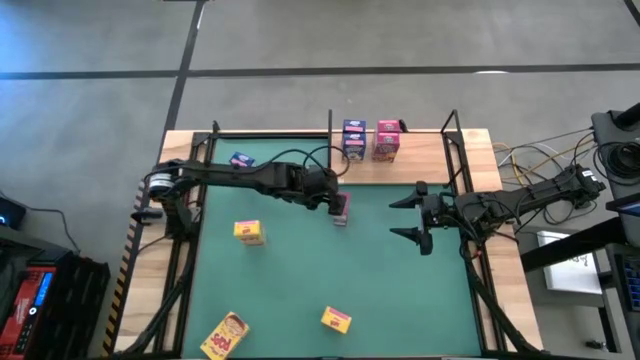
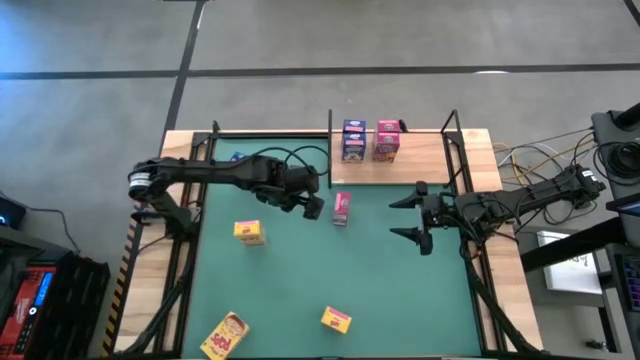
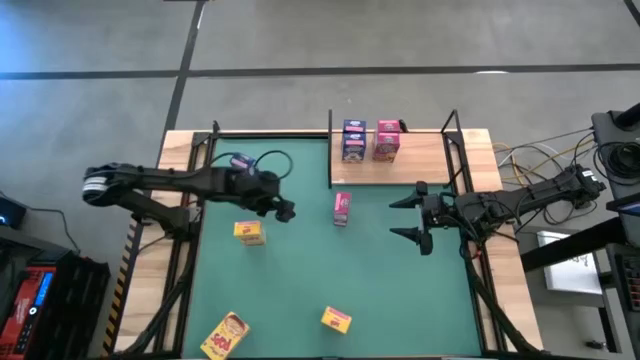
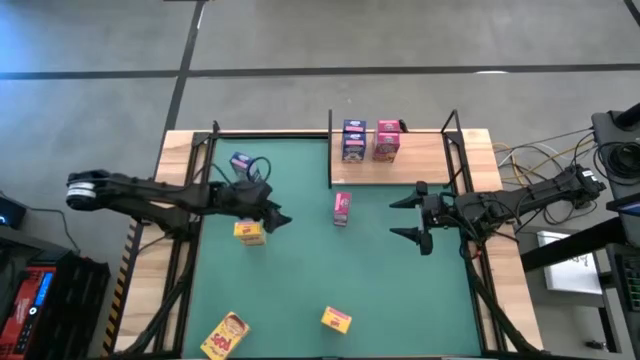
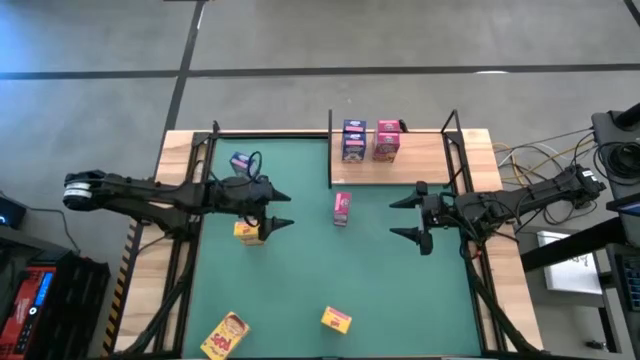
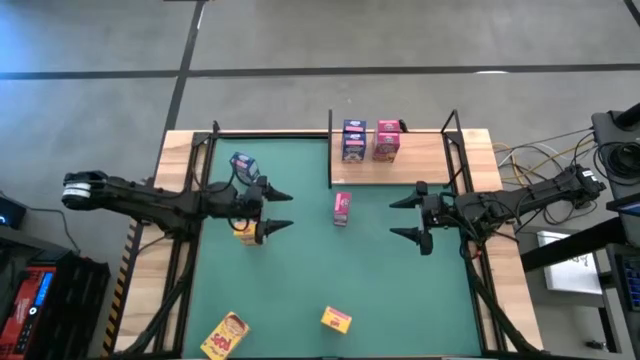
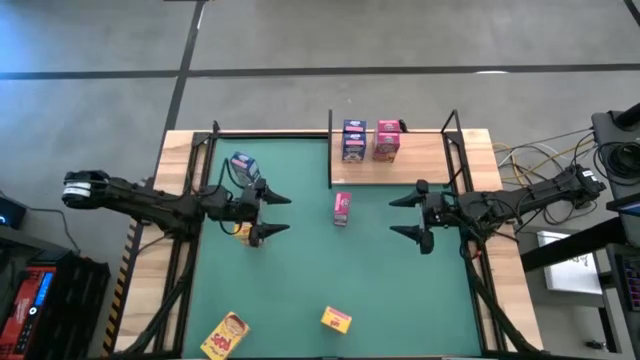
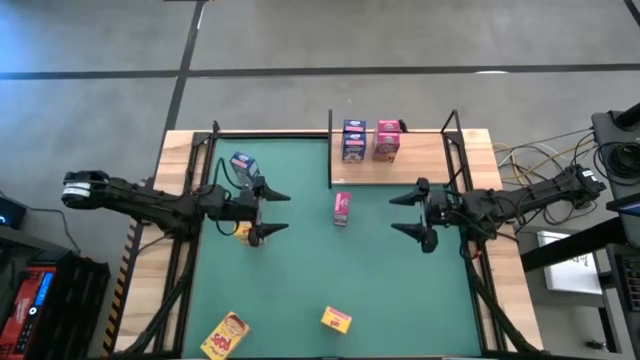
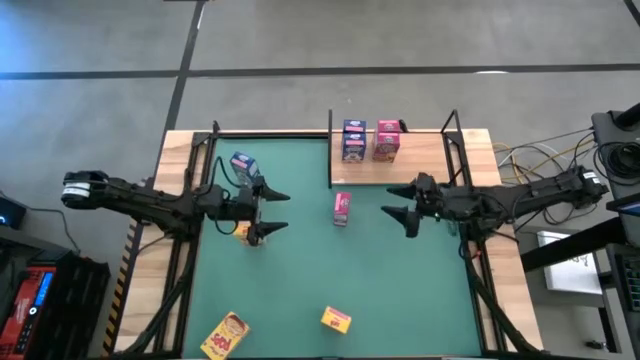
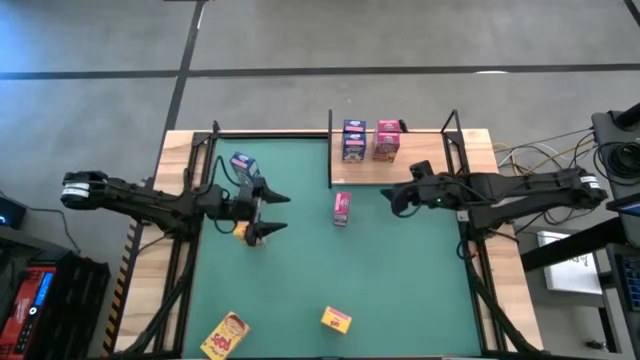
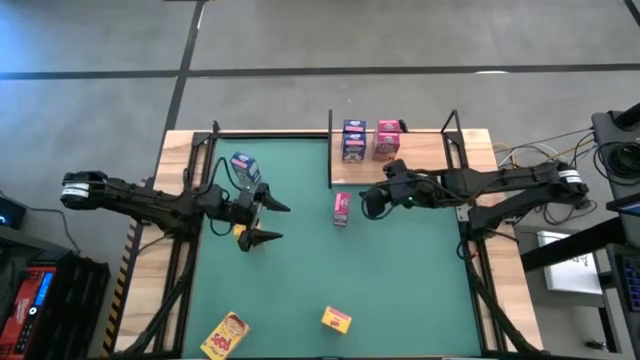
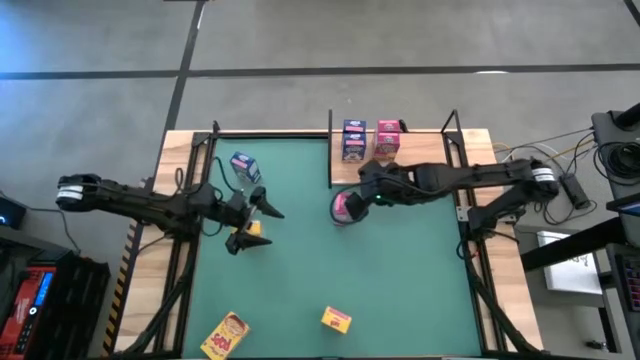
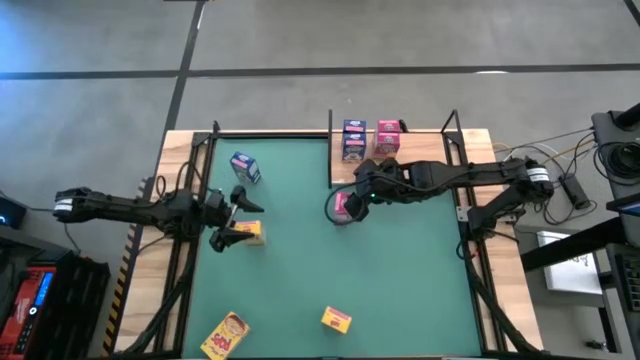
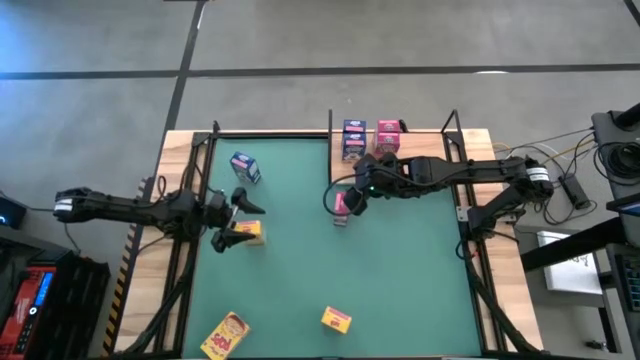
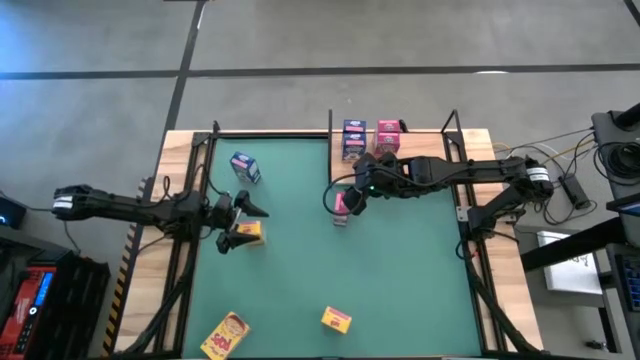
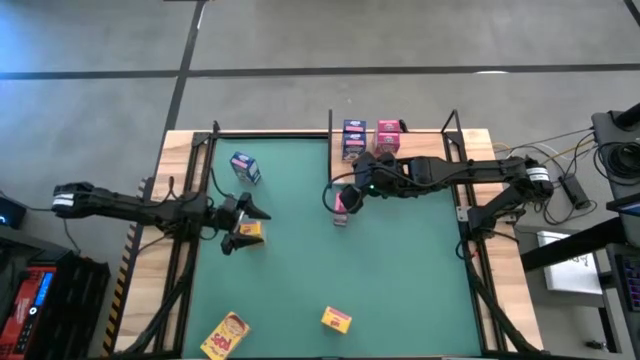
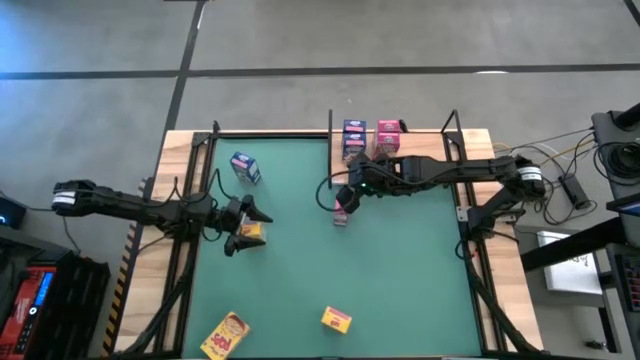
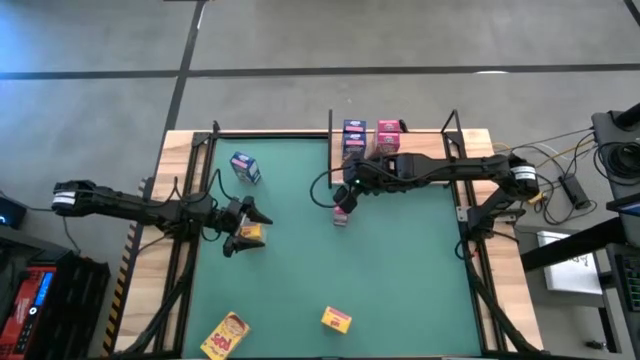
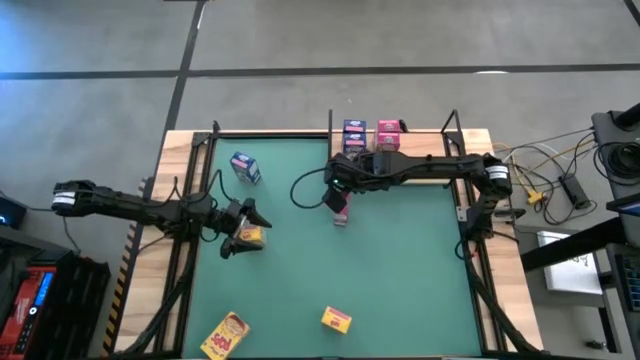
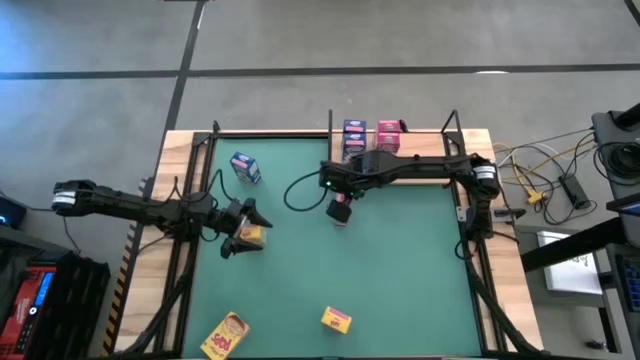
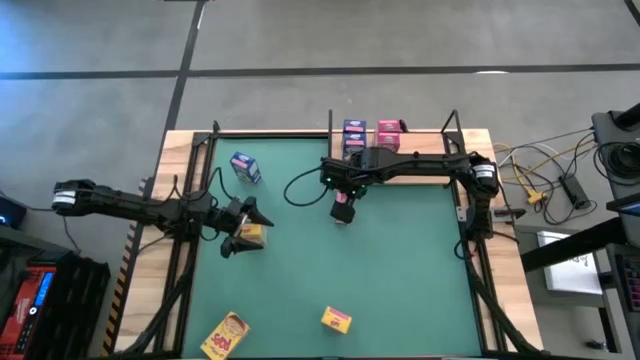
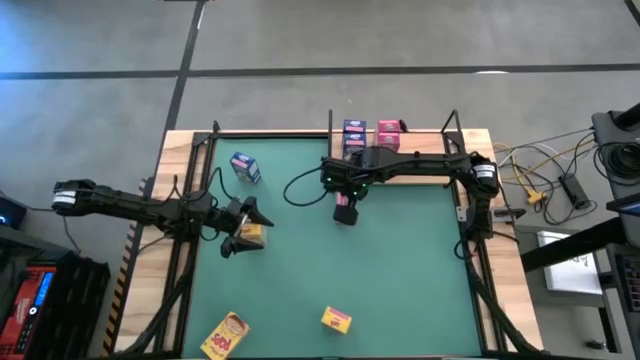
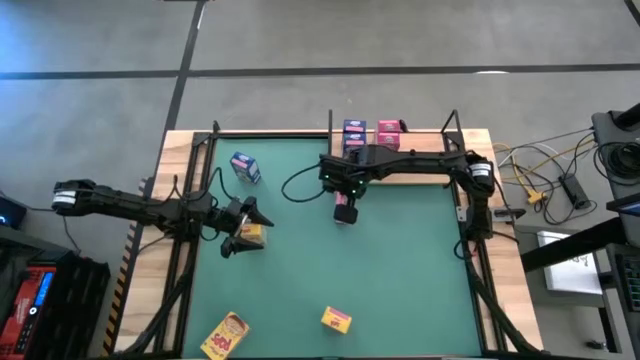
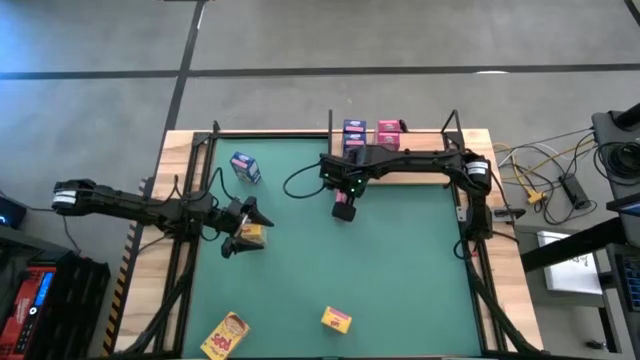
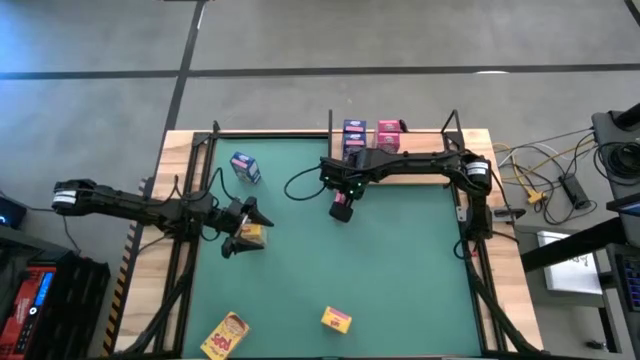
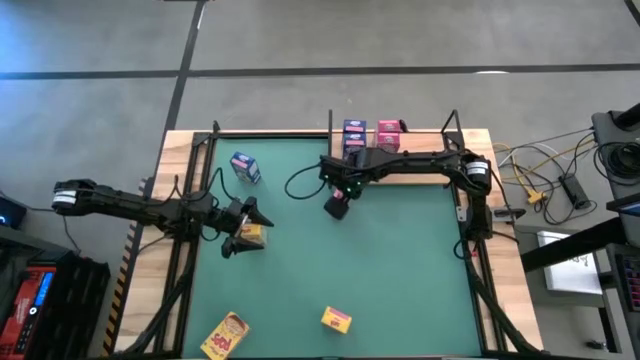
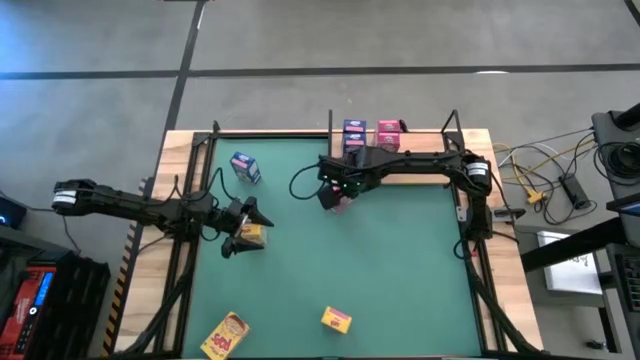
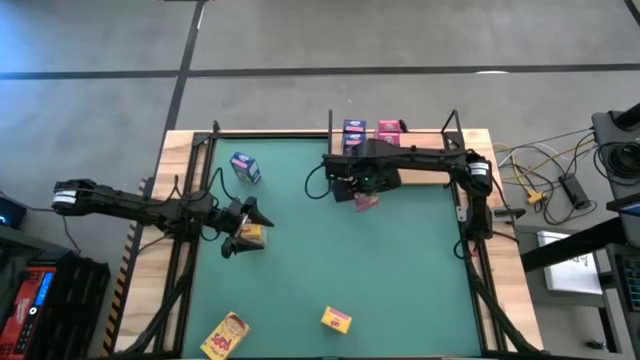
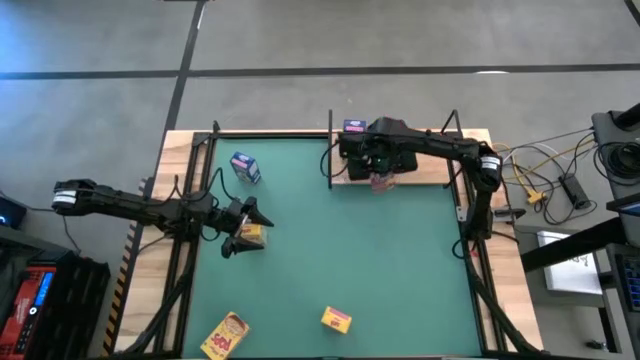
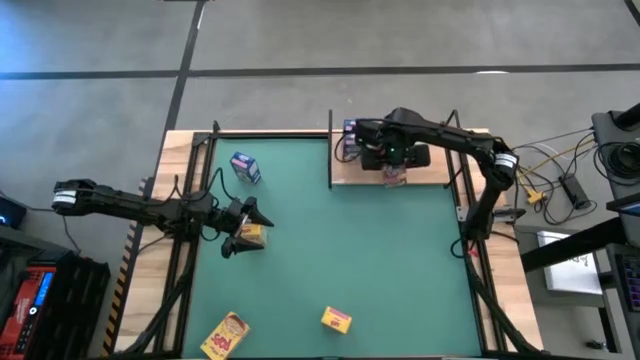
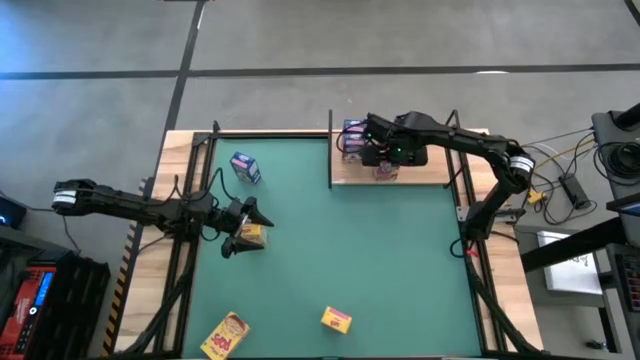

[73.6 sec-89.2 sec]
Task: Stack cereal on shelf
Put the pink cereal box on the shelf

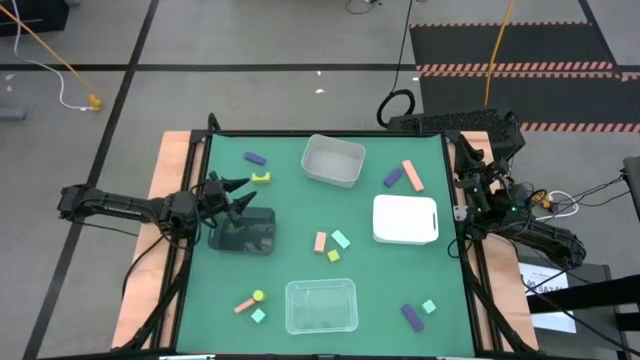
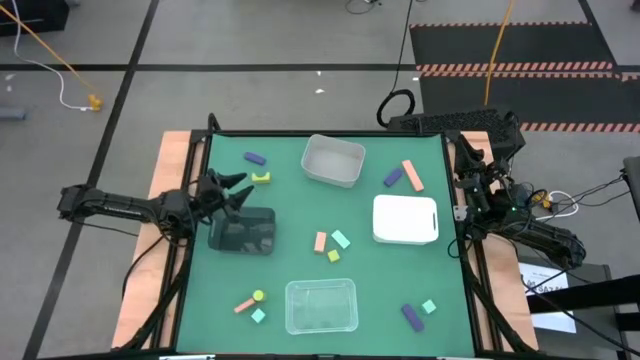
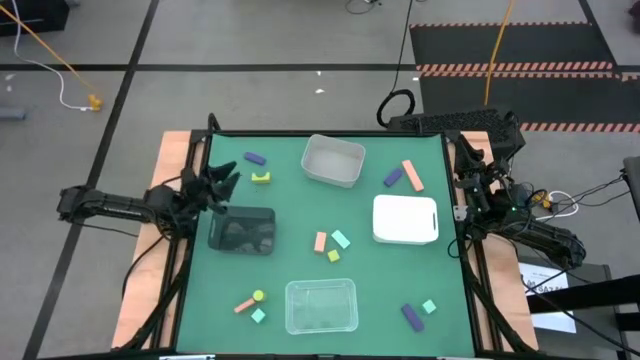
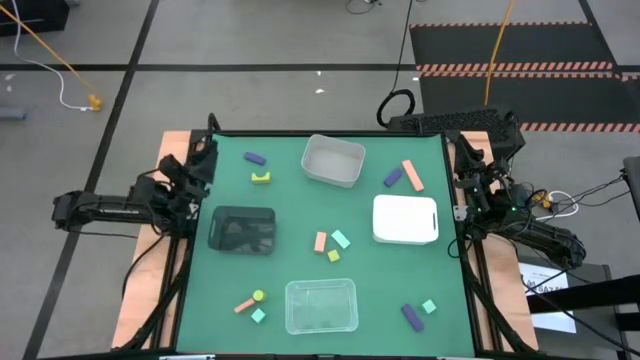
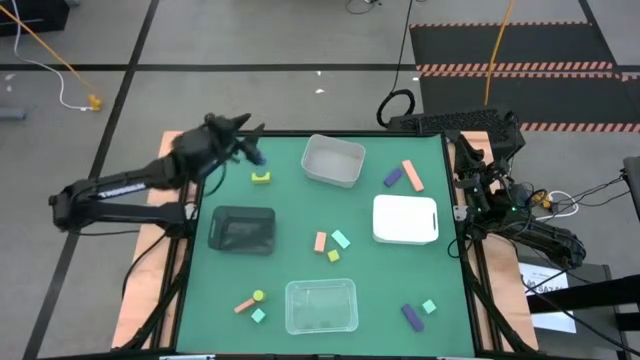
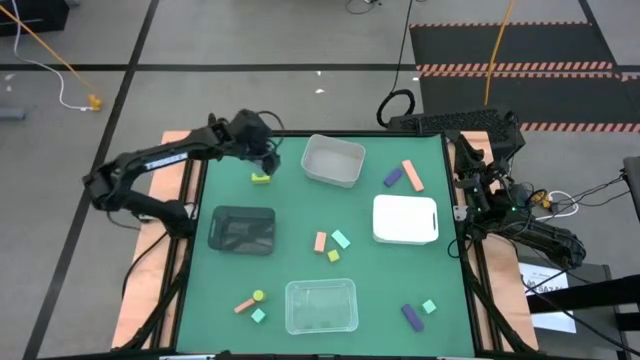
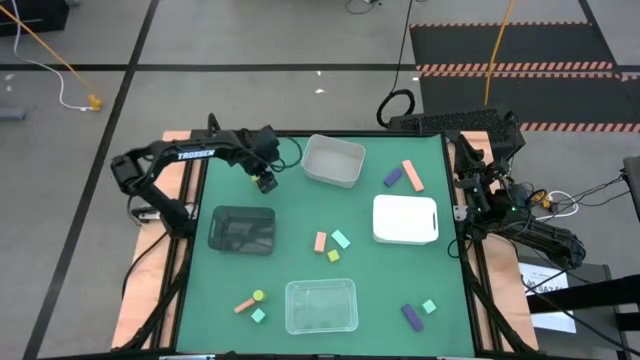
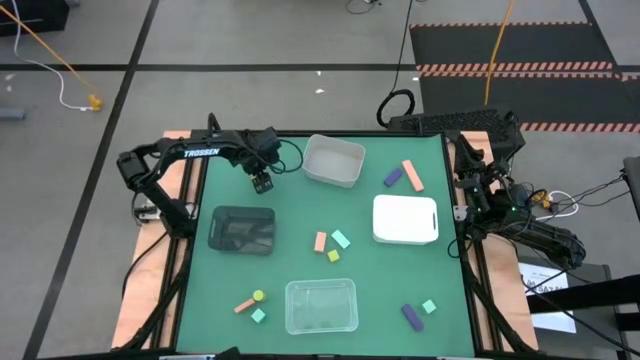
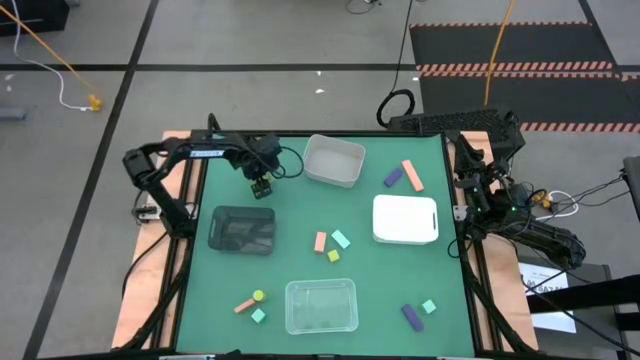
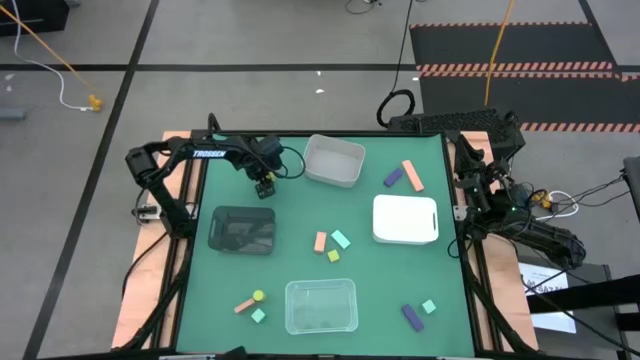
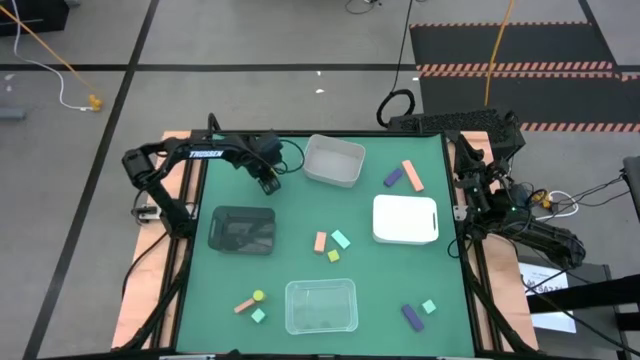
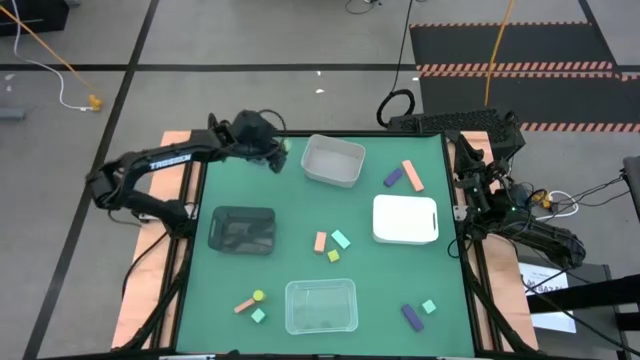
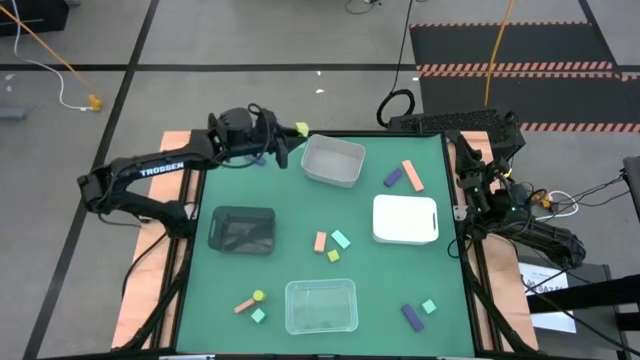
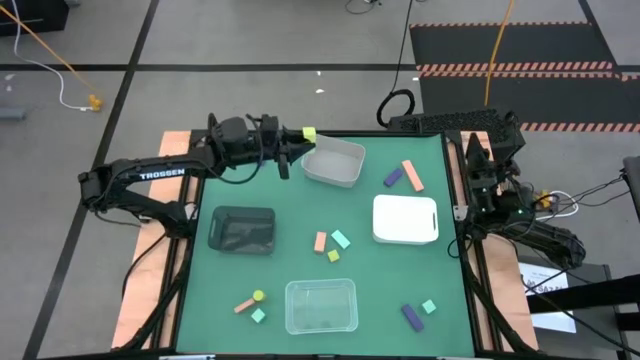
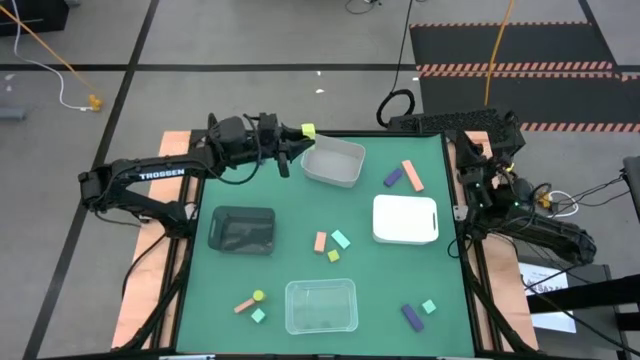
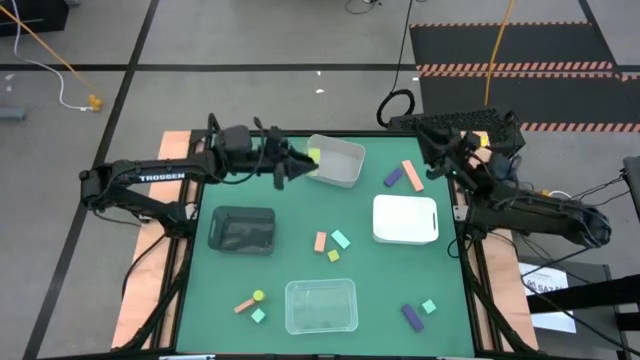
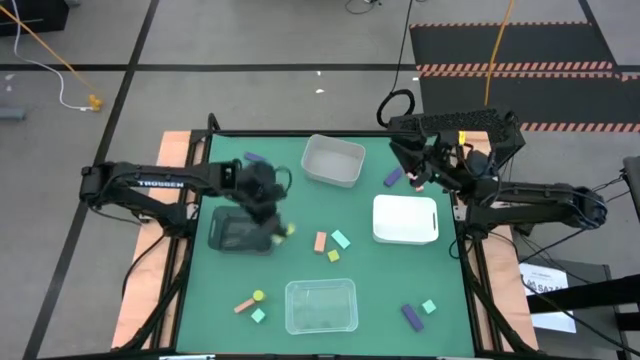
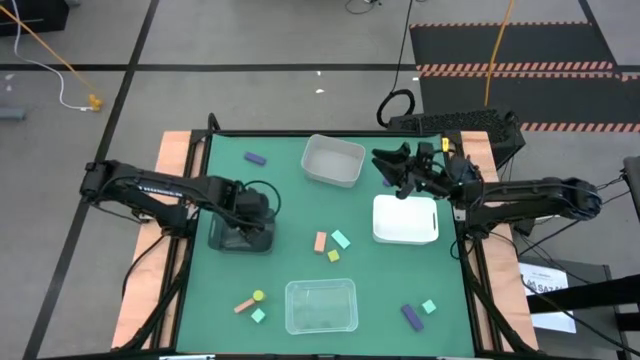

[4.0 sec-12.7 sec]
Task: Sort & place blocks by color
Put the top left light orange block into the black bin
